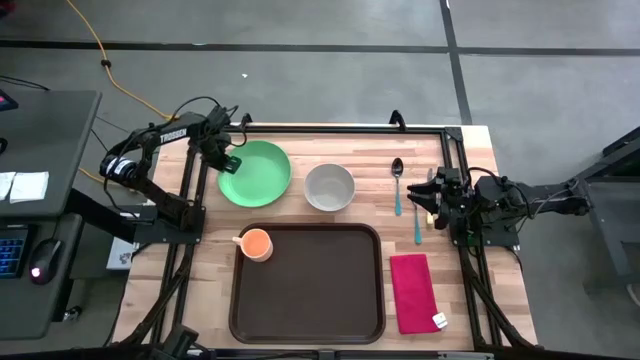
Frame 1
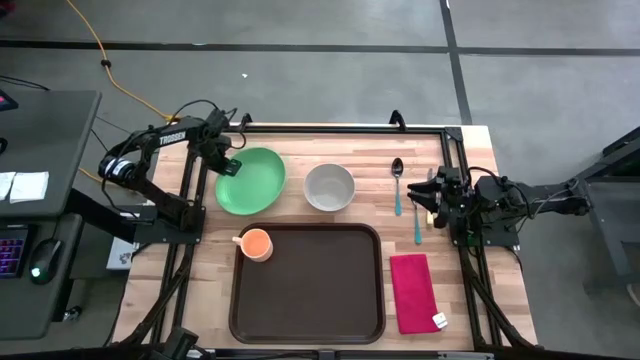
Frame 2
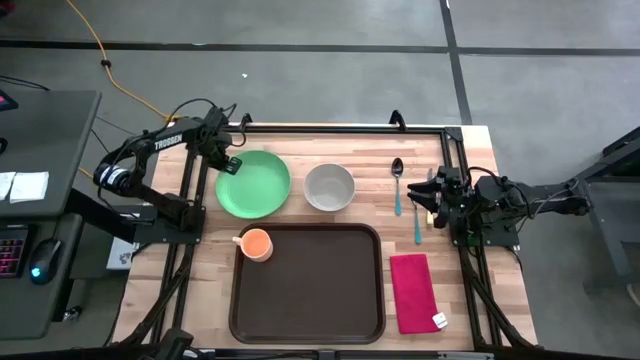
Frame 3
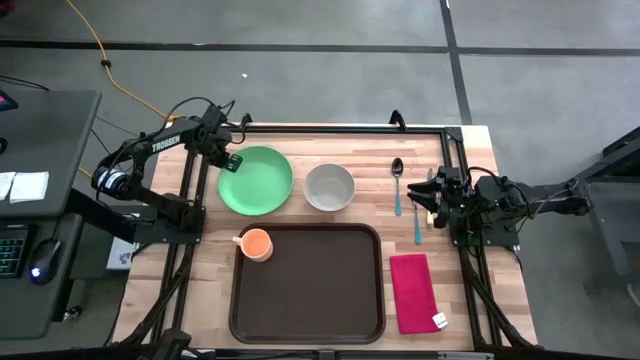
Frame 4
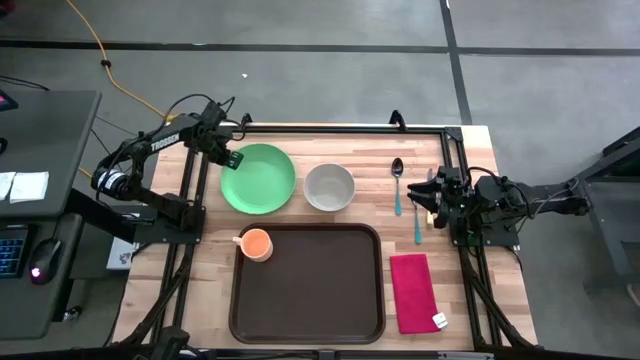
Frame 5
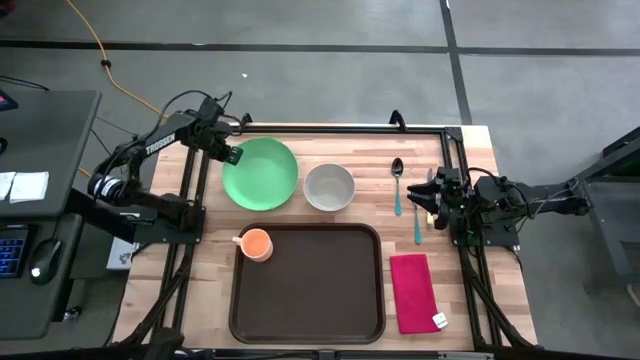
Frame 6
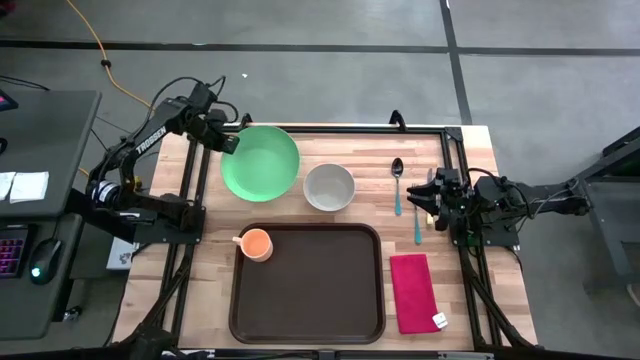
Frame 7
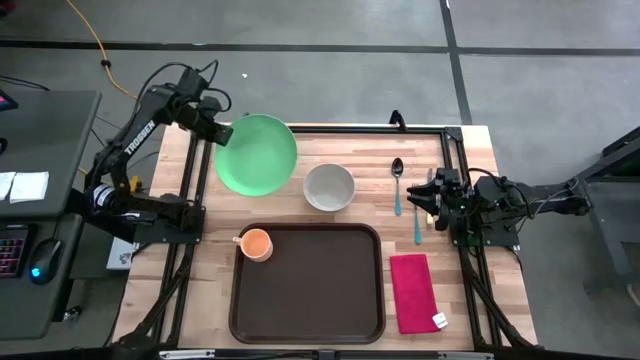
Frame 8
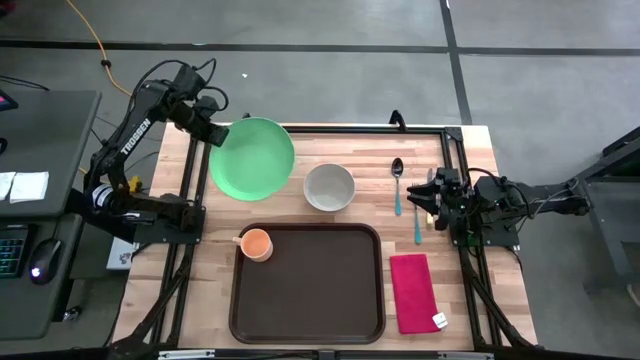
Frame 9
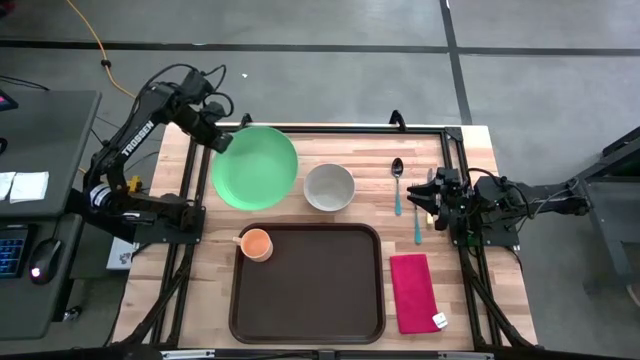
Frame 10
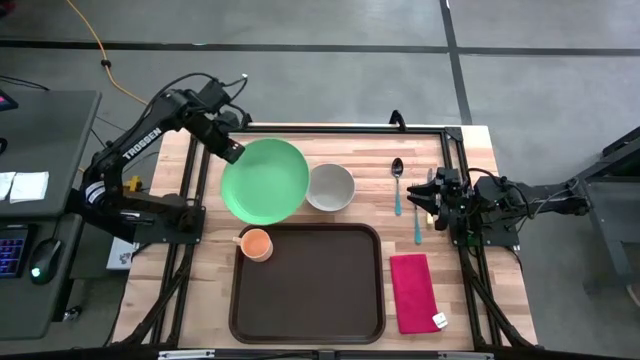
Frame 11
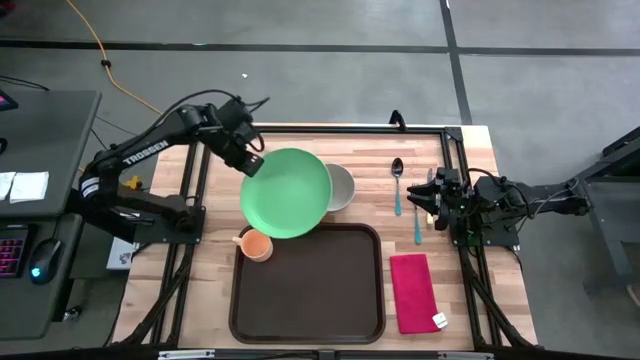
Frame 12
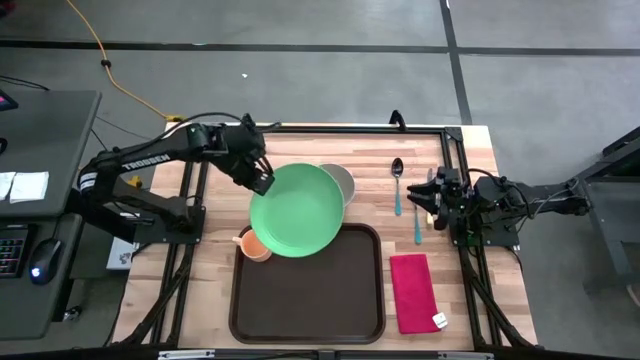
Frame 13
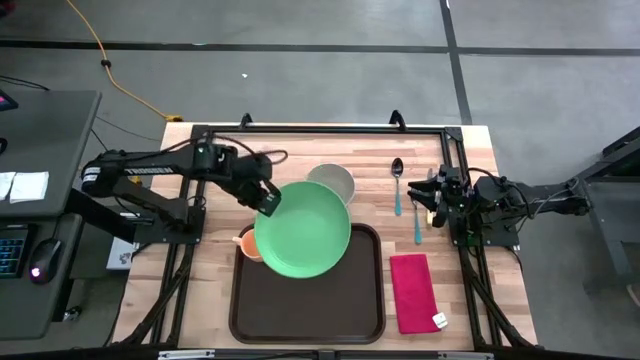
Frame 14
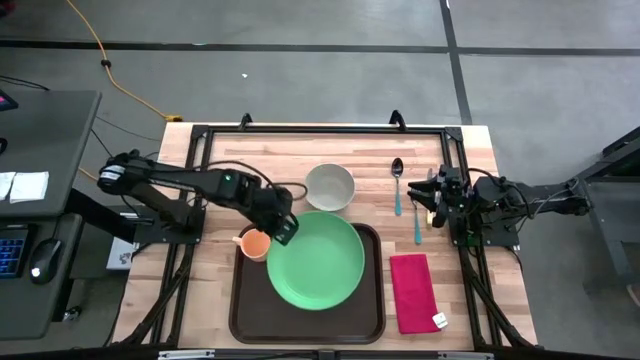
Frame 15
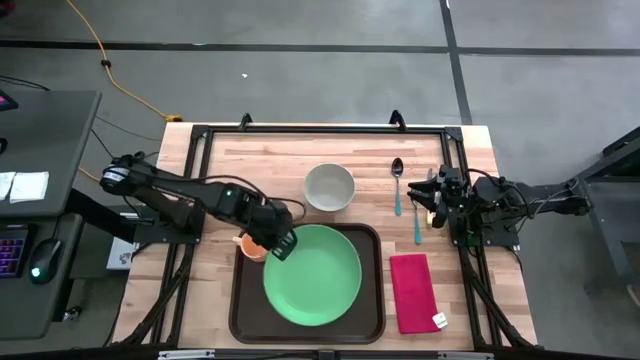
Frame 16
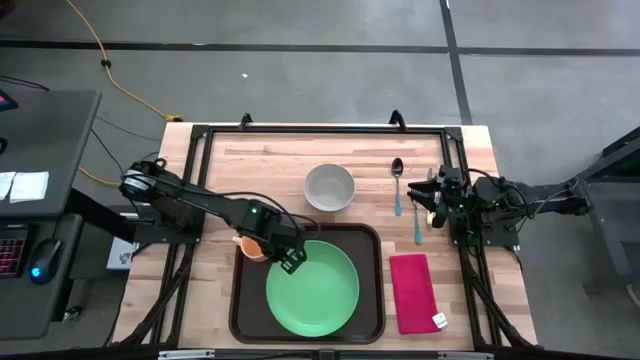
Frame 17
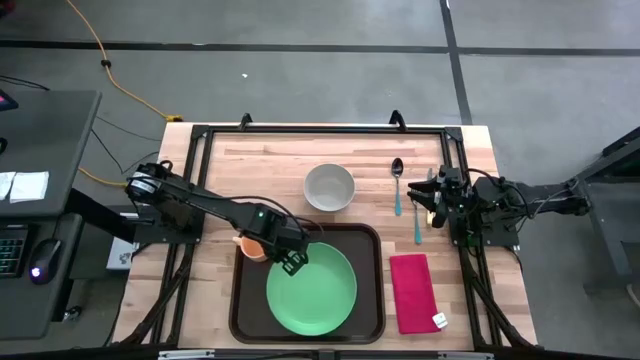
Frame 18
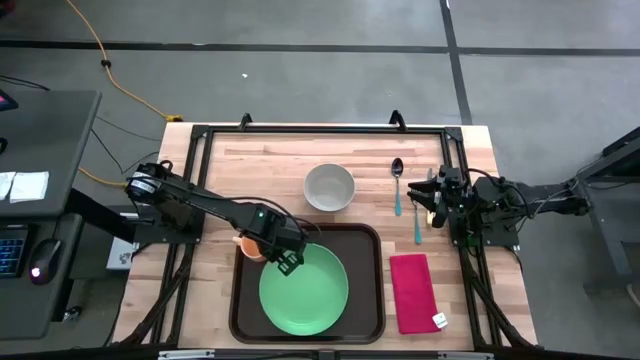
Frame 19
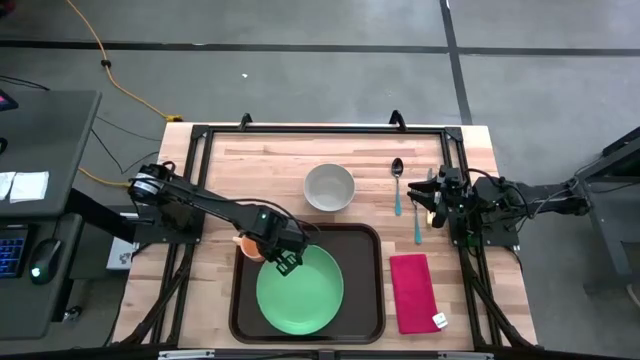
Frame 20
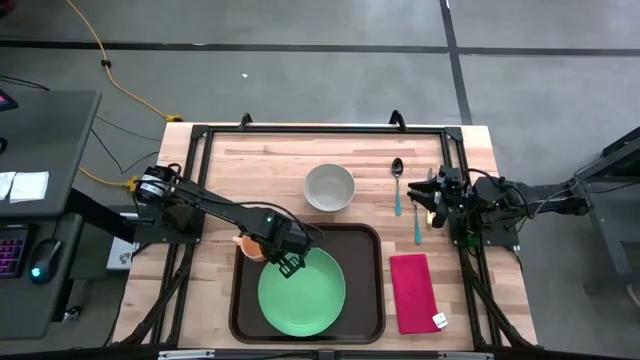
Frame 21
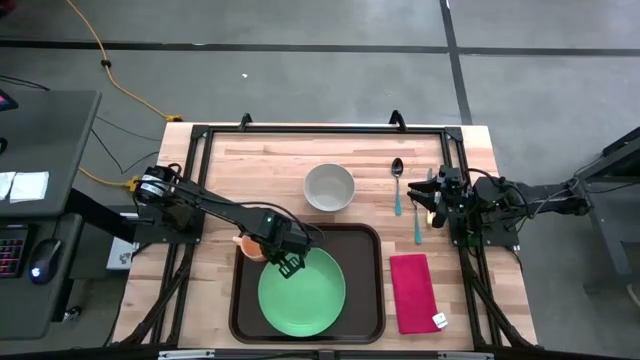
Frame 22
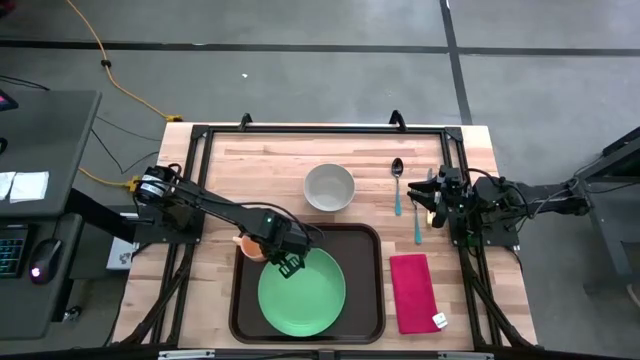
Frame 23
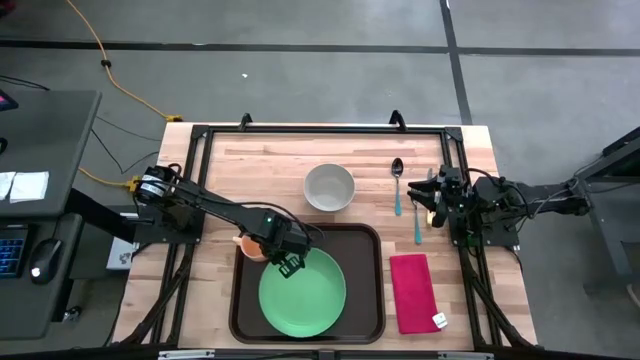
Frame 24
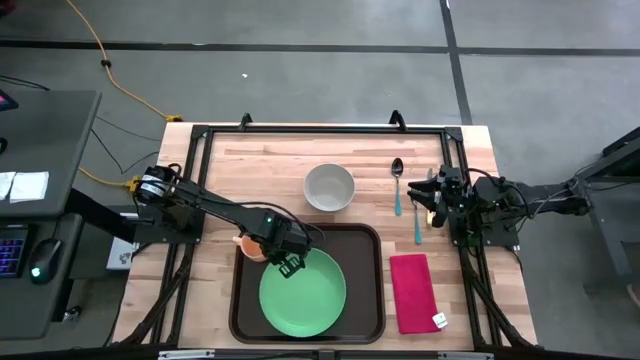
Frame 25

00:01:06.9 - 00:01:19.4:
Task: Set up tray
Put the green plate in the center of the brown tray

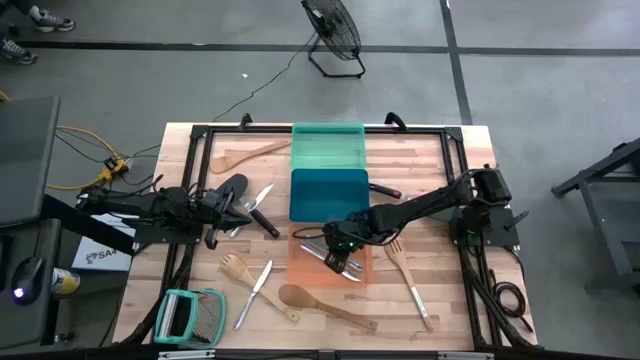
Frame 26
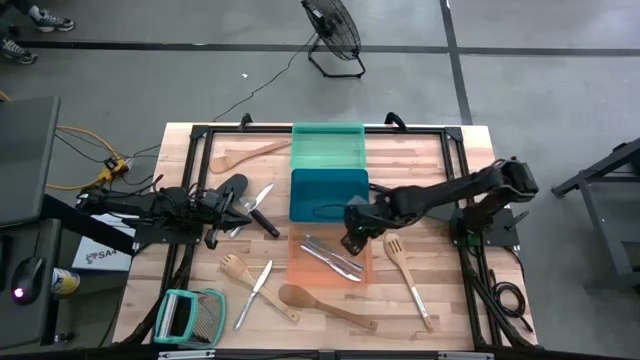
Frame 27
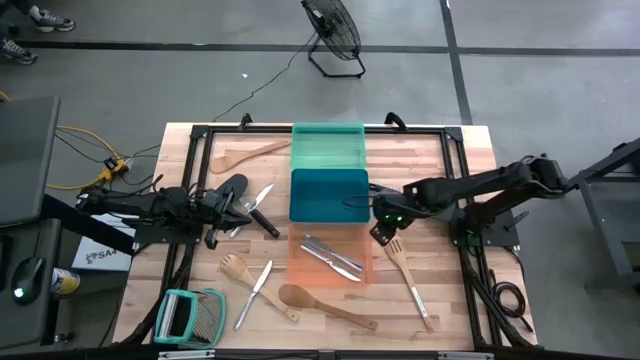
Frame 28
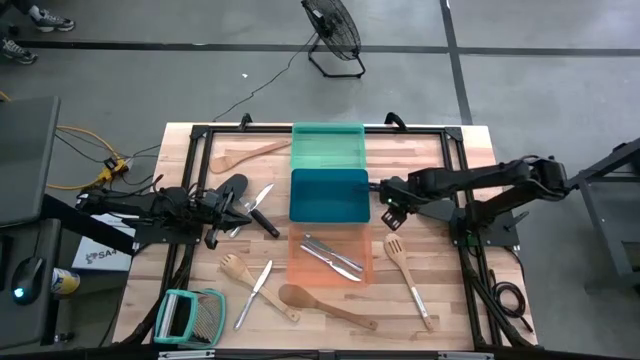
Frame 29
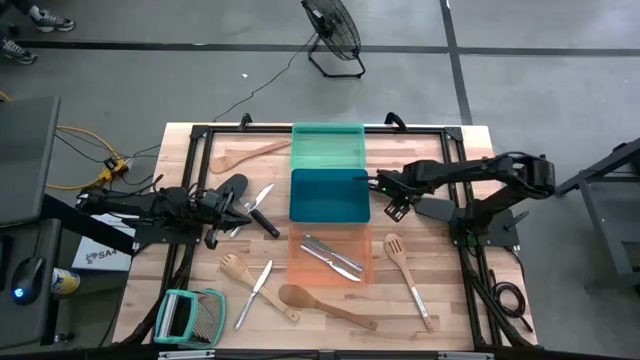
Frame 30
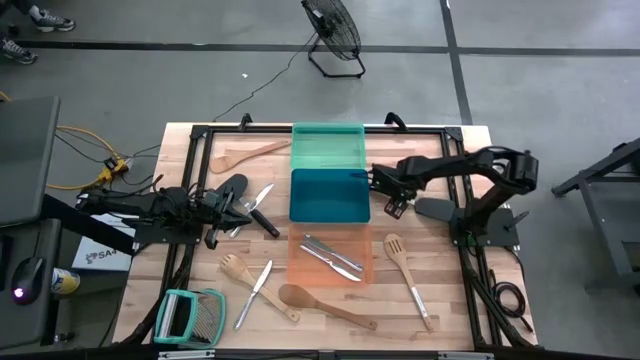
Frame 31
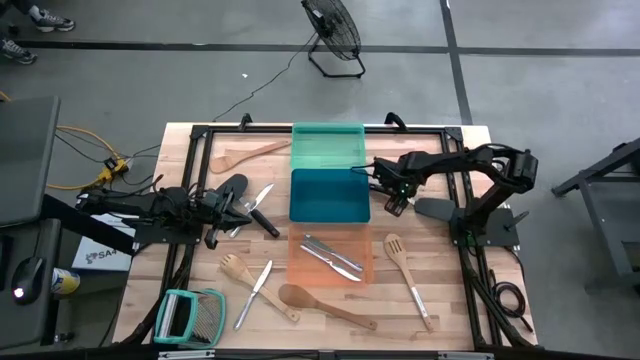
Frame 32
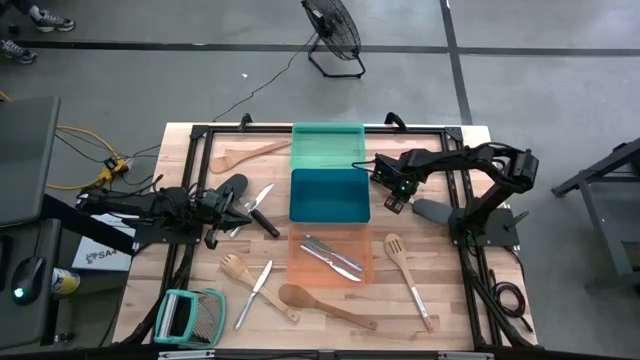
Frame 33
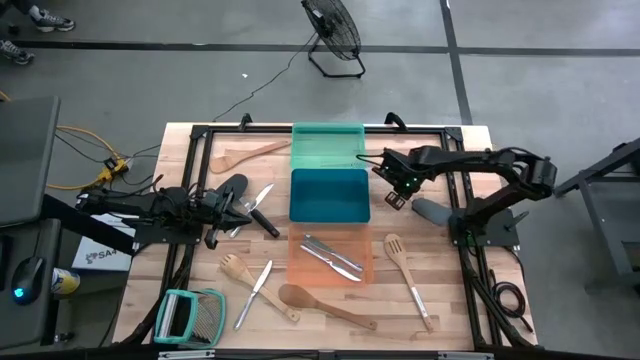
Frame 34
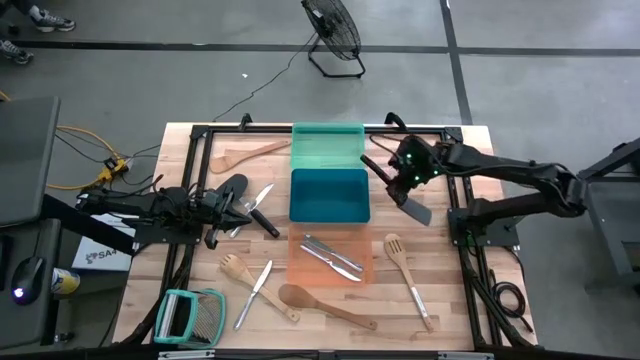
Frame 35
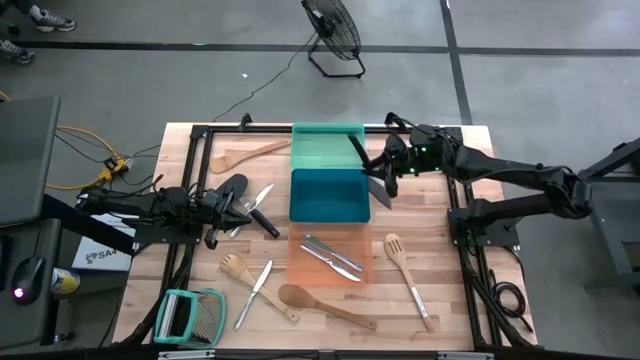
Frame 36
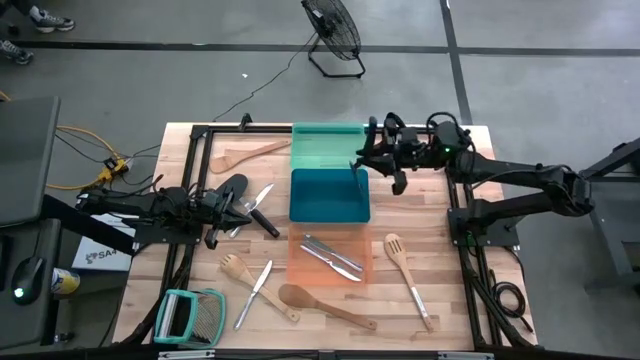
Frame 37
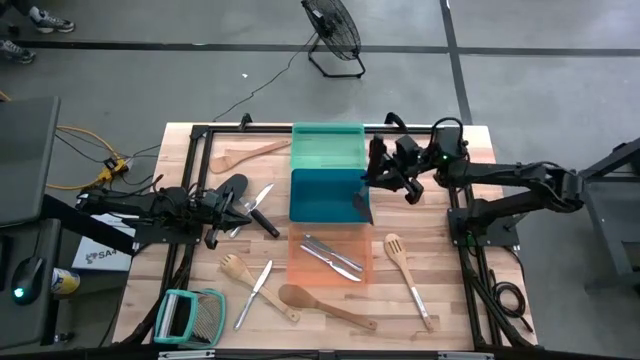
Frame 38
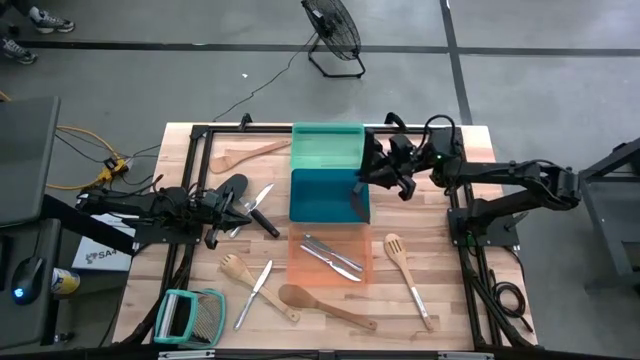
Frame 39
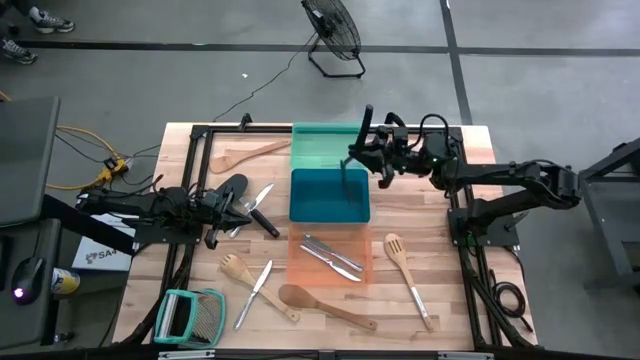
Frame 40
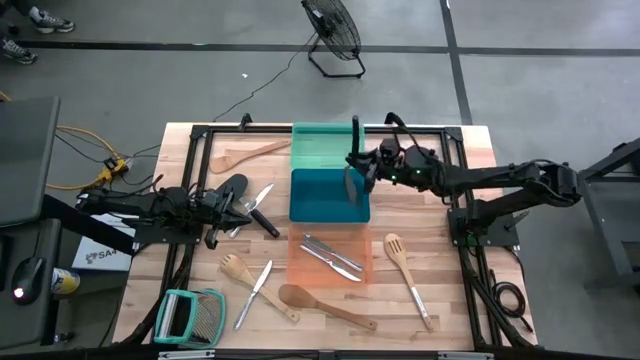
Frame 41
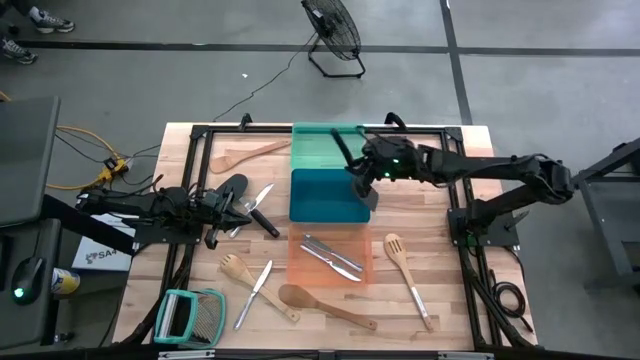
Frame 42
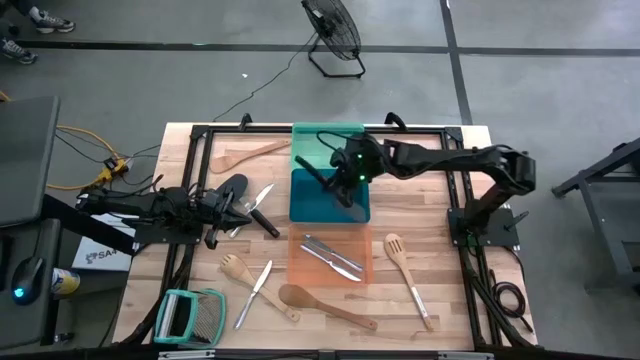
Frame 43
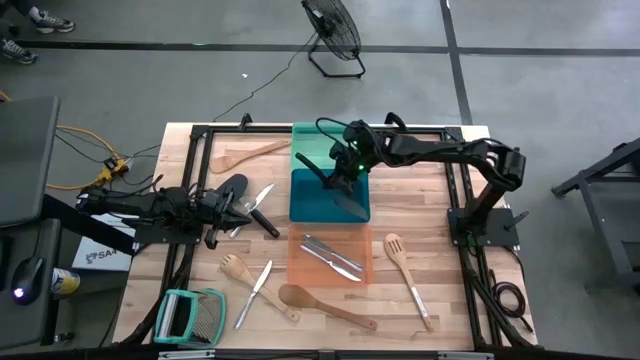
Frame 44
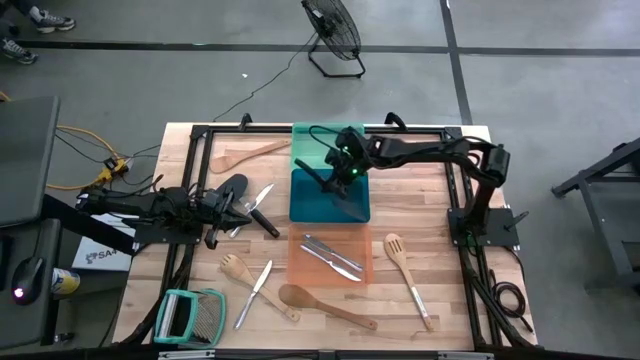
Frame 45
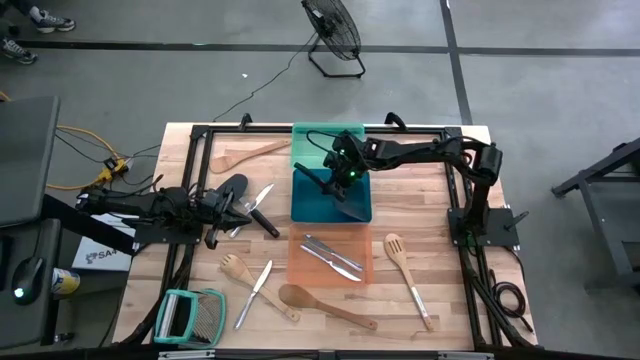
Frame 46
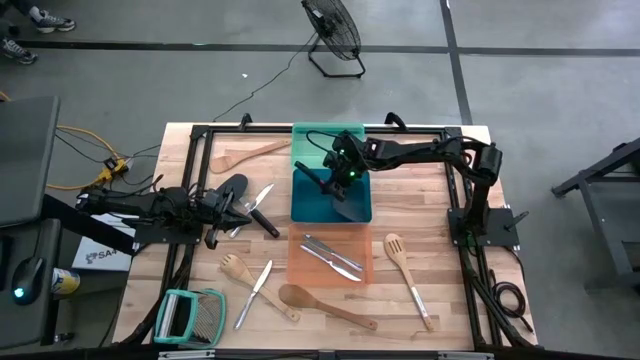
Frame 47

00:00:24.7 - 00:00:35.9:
Task: Pick & Place Kitchen Items
Put the black spatula into the blue bin
